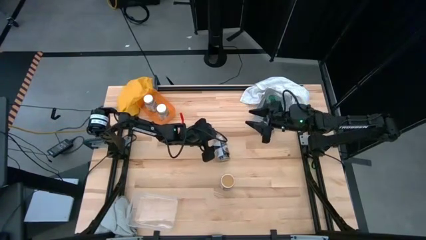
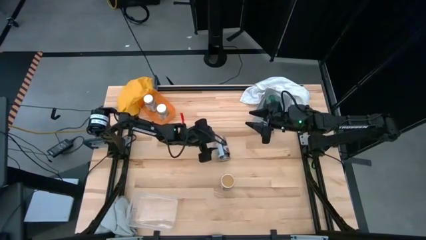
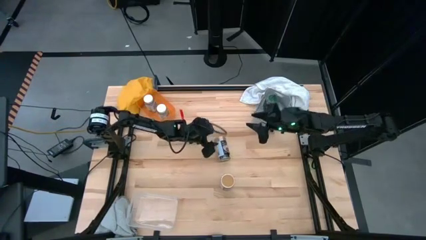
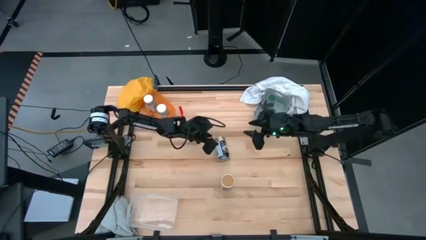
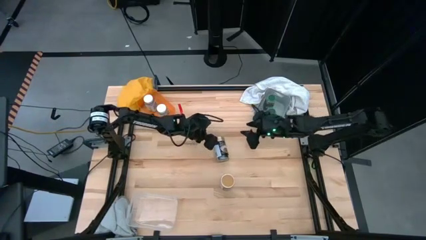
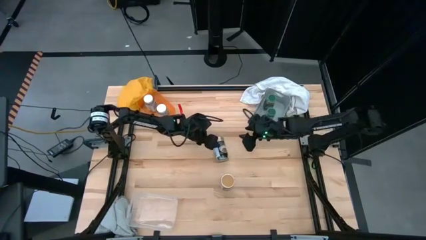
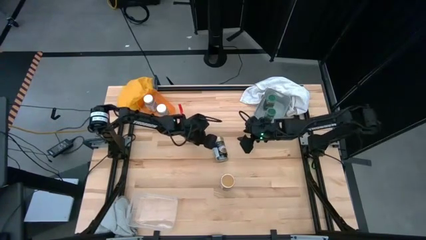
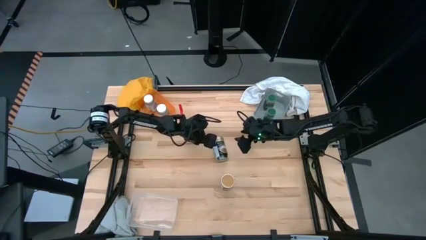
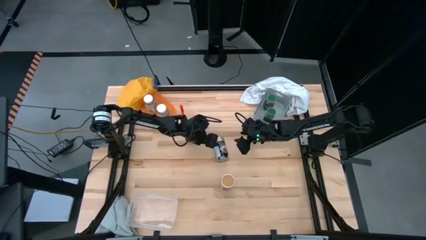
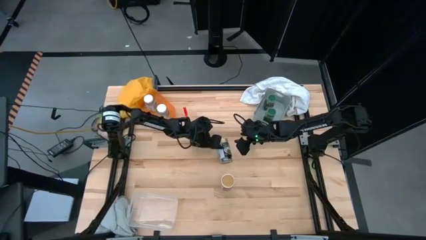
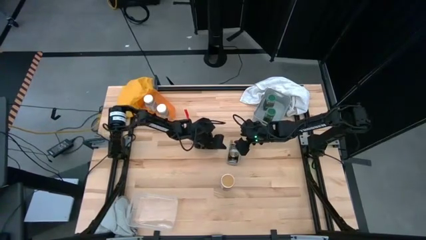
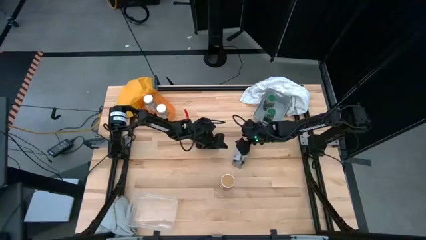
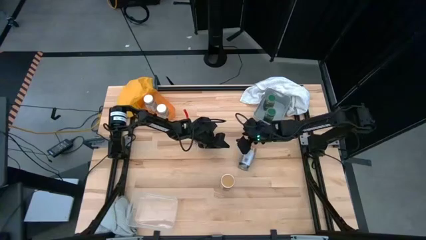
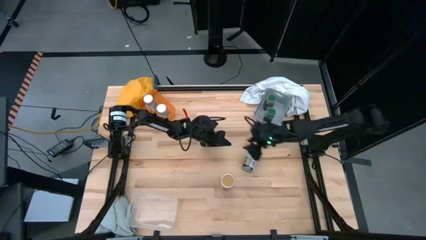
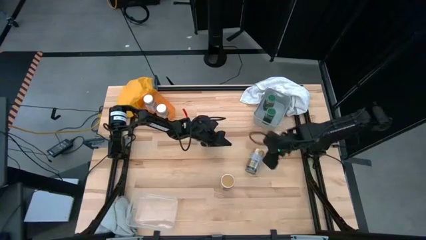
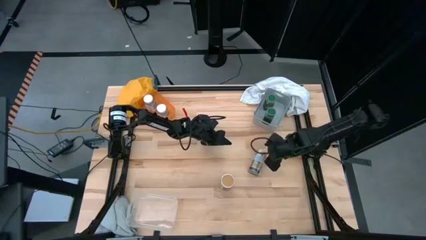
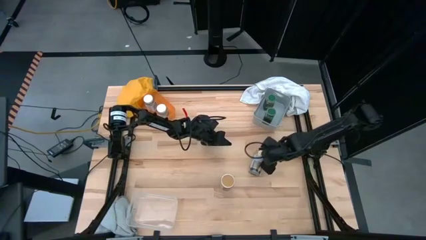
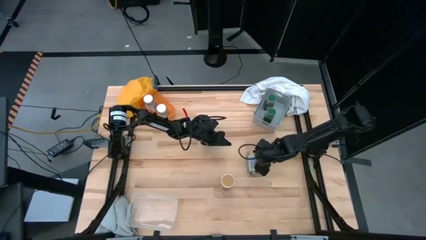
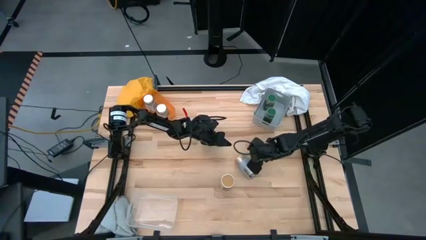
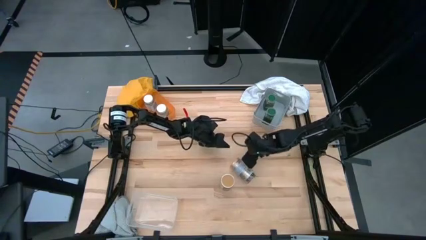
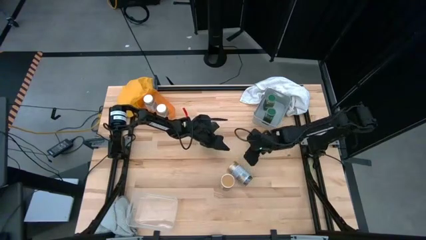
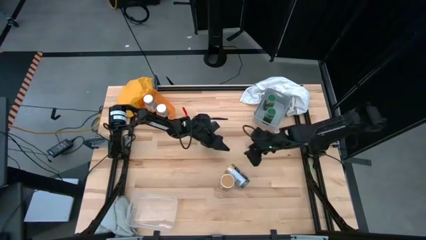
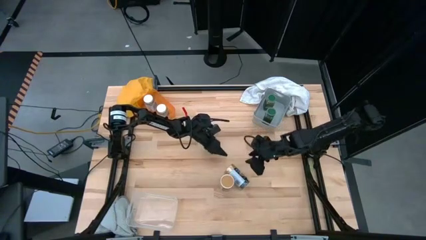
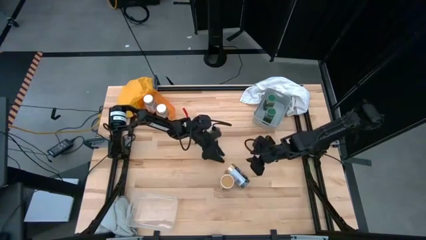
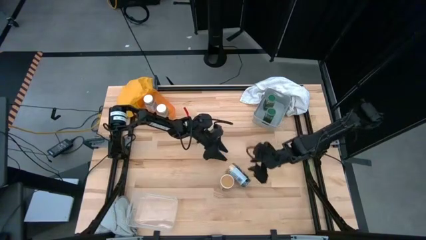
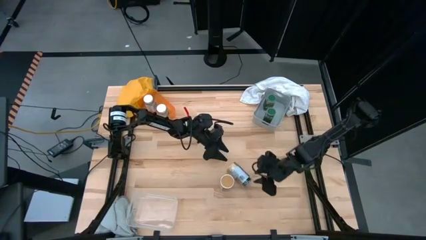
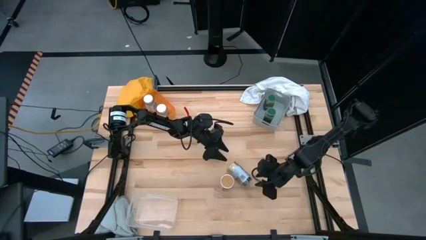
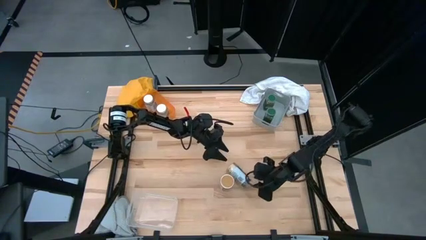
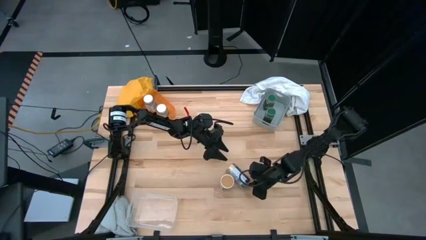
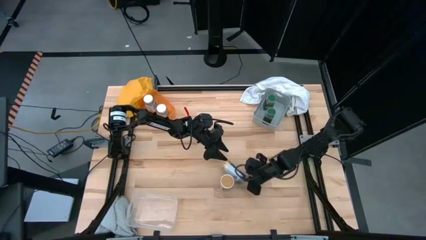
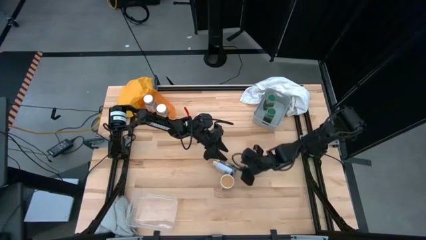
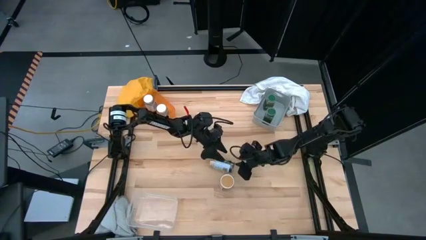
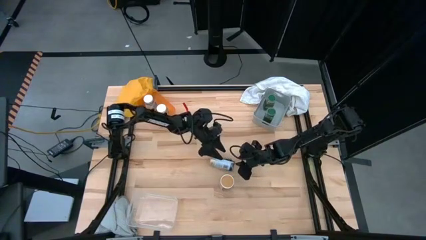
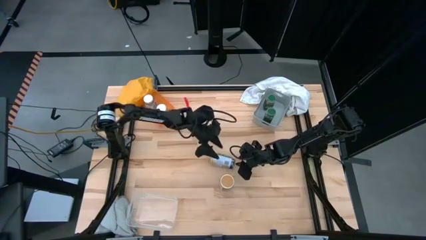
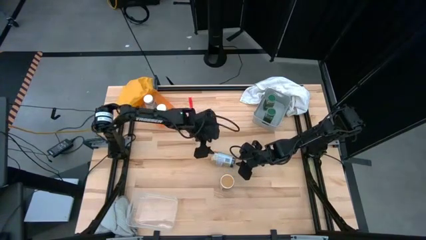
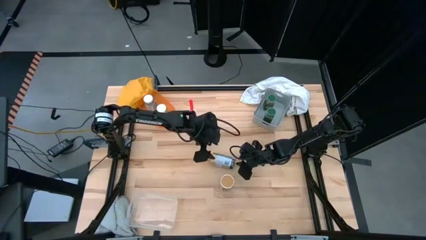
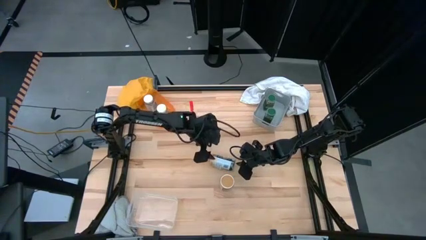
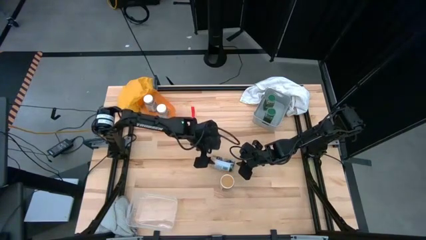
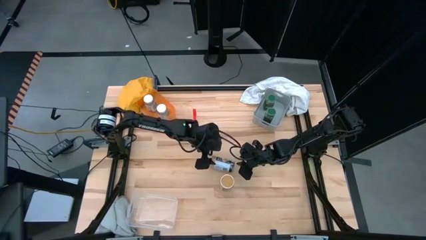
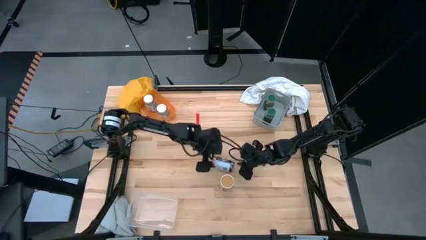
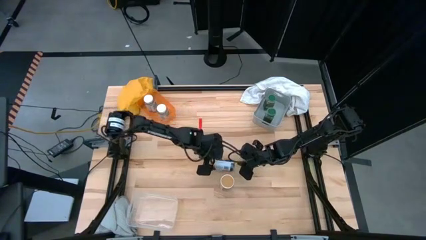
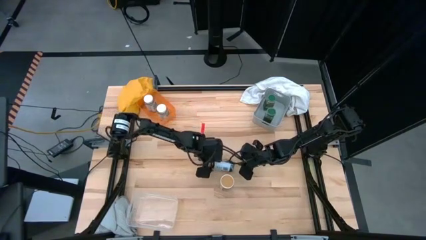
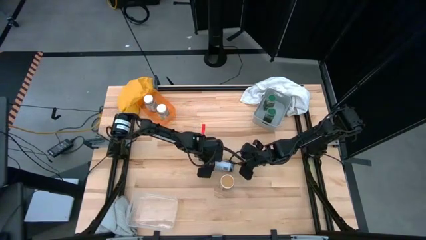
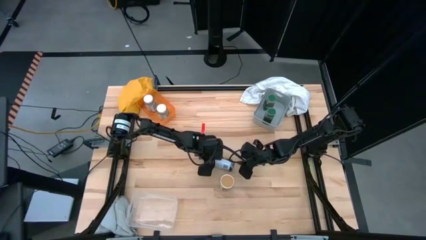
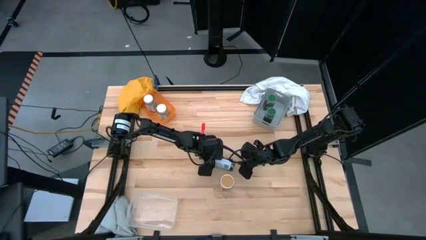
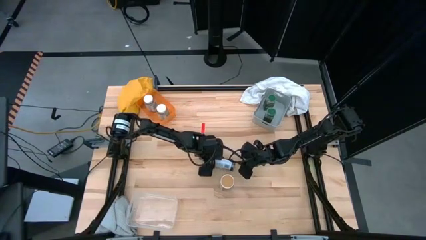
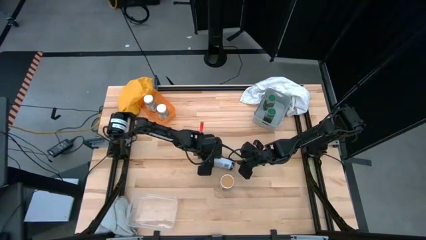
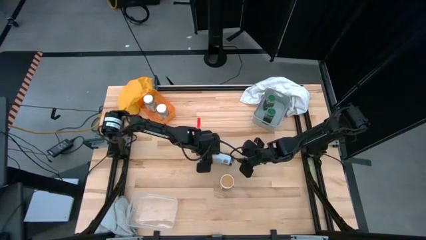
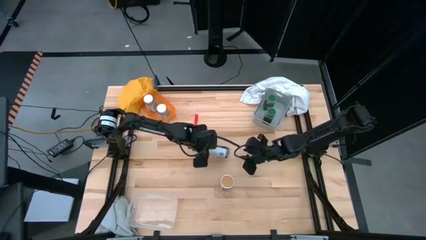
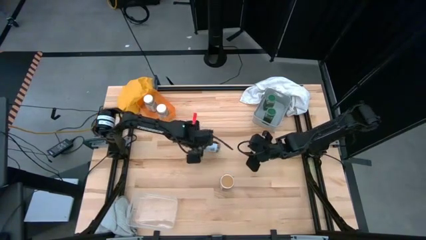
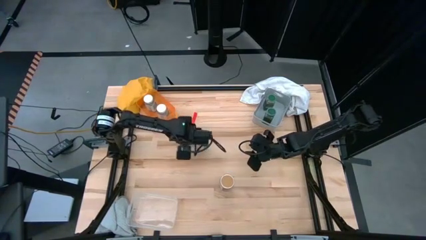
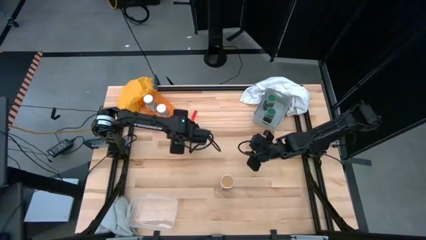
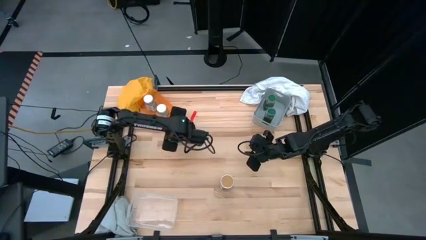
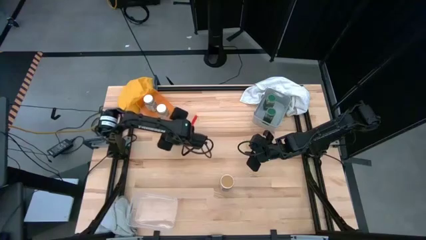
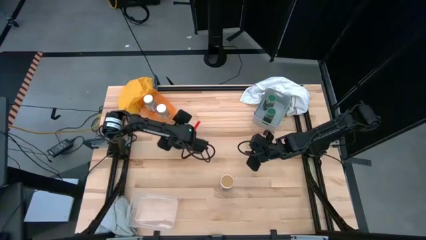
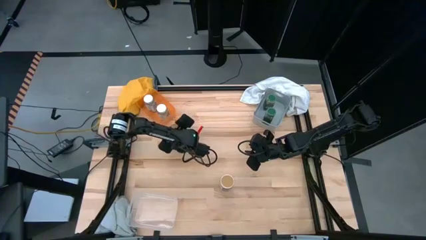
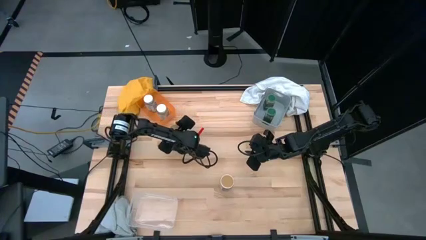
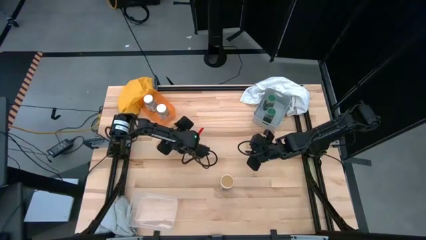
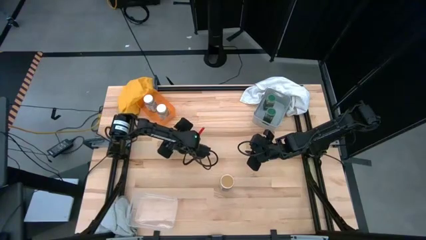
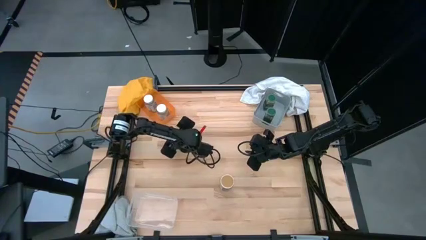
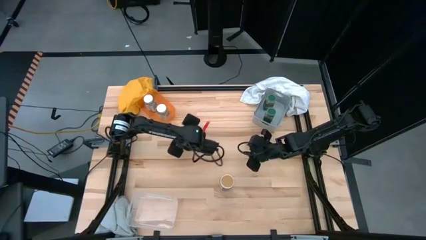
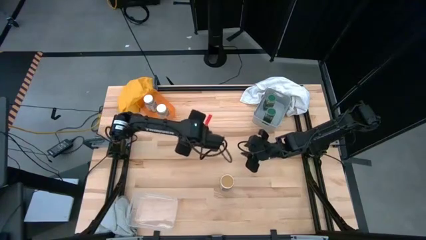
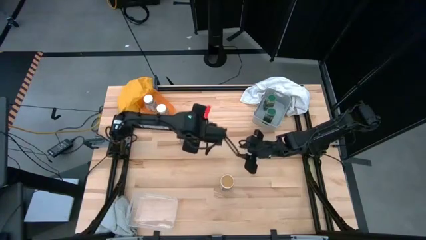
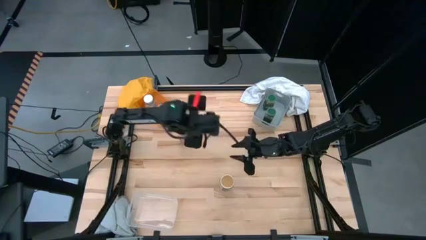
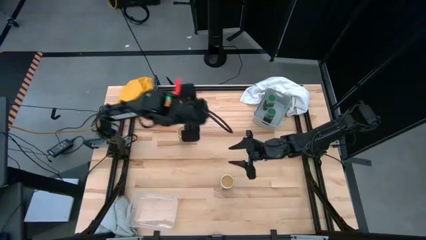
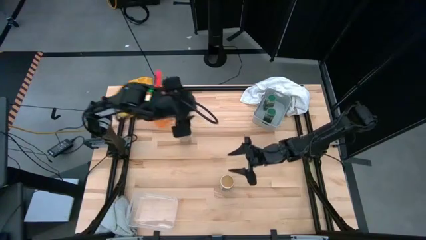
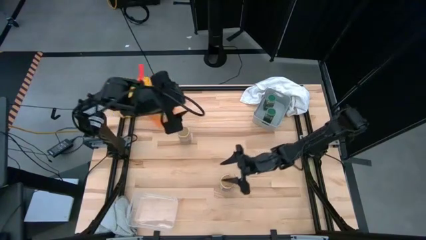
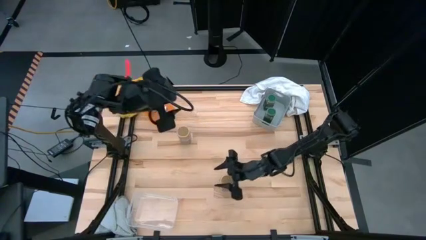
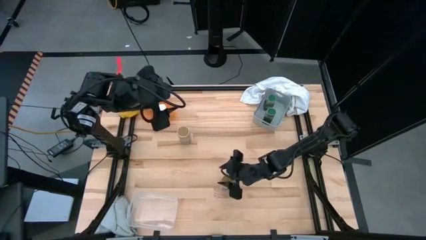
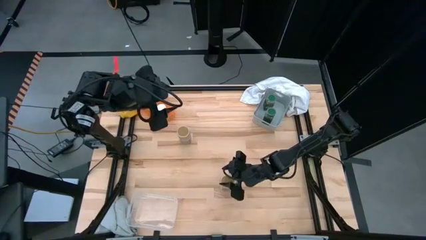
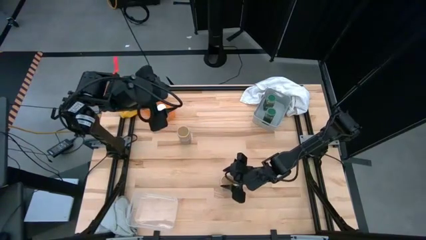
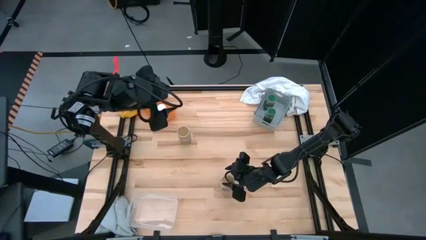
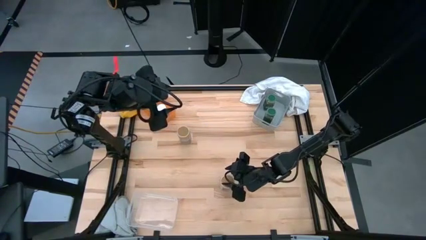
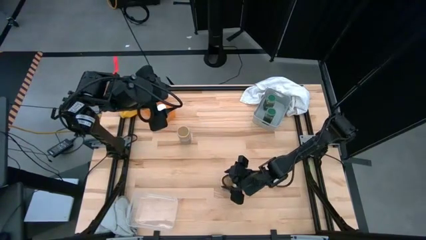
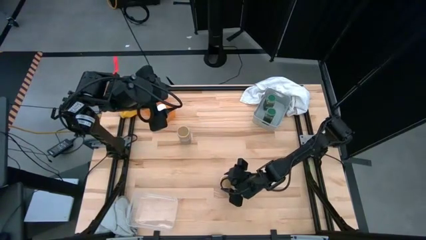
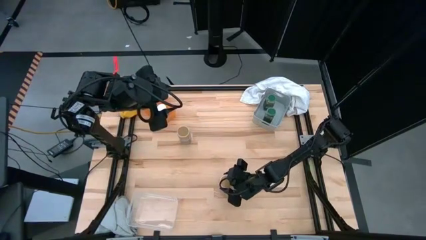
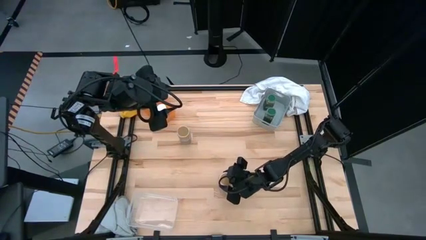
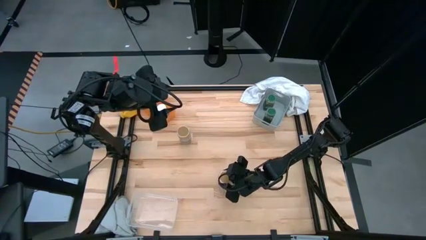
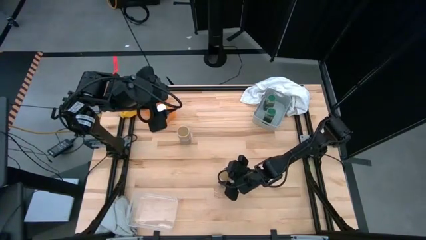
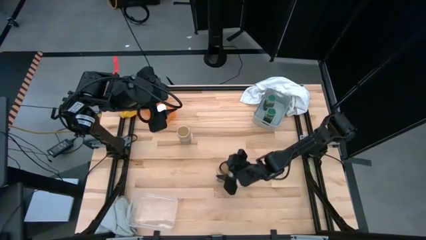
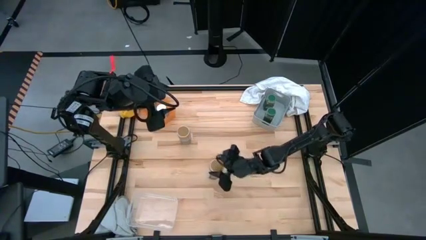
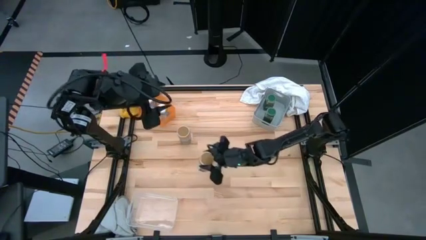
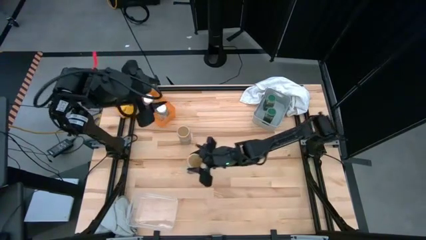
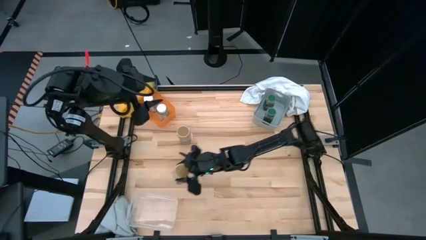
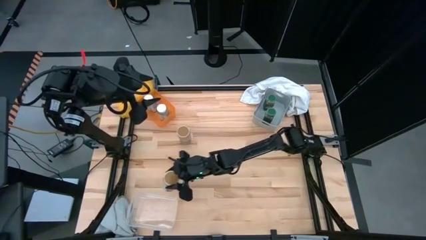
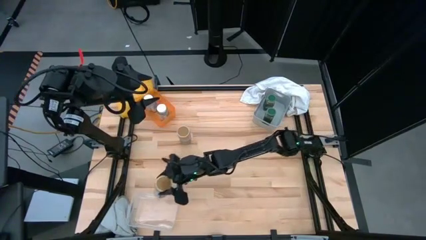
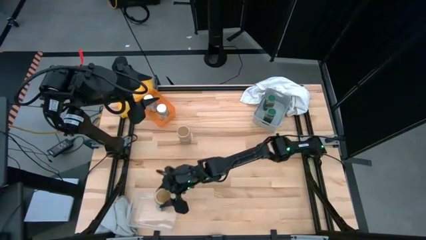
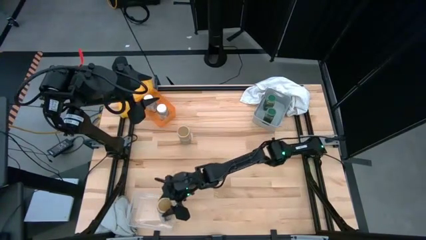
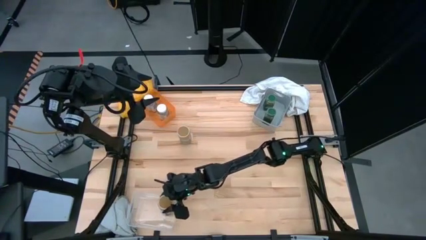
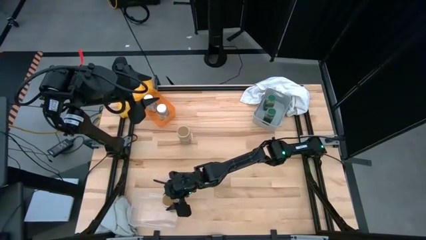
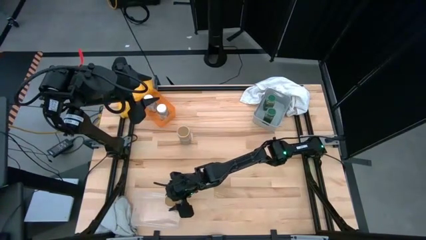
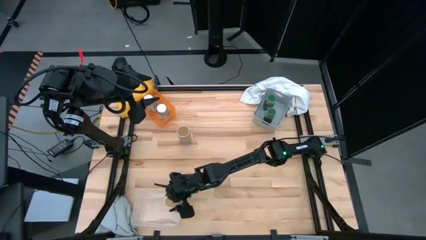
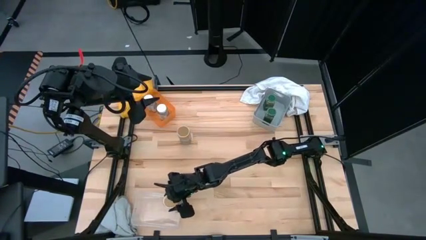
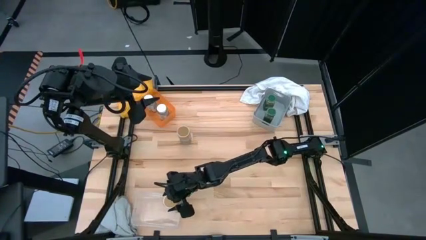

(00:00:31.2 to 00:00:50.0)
Task: Sort spices by type
Put the top gold seasoning bottle into the transparent bin
